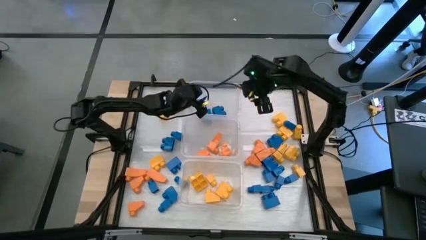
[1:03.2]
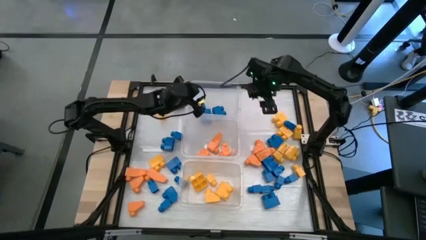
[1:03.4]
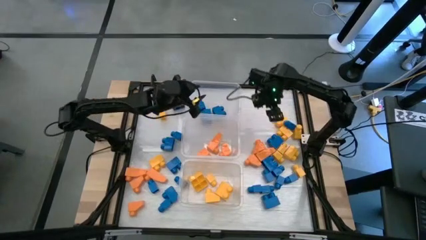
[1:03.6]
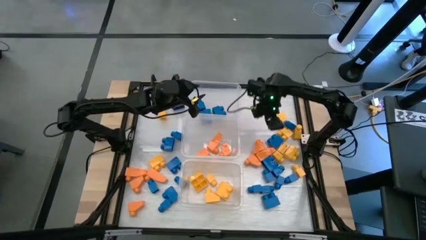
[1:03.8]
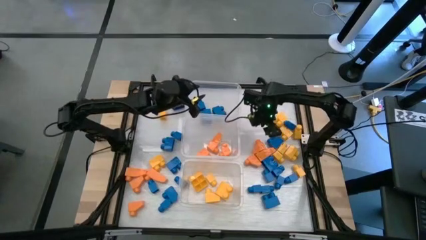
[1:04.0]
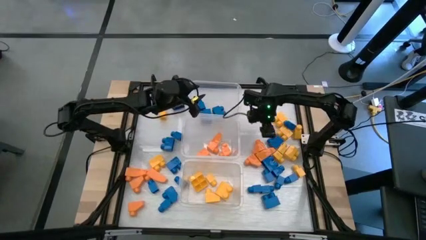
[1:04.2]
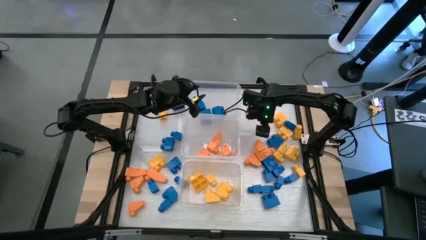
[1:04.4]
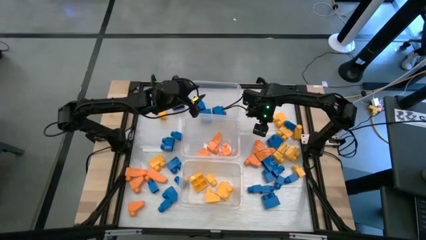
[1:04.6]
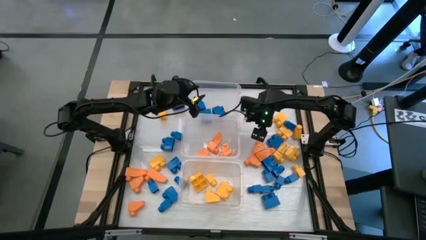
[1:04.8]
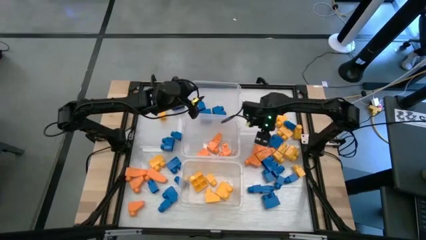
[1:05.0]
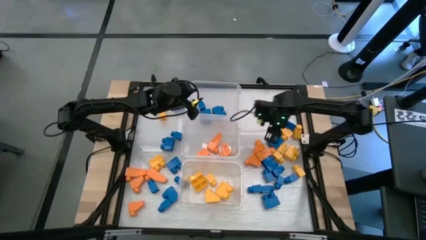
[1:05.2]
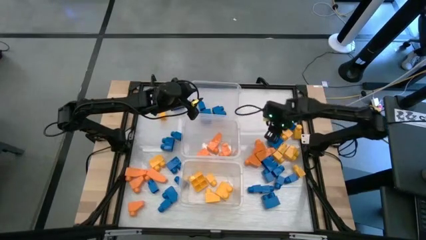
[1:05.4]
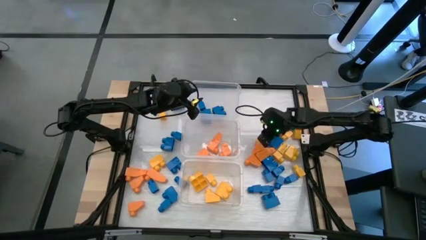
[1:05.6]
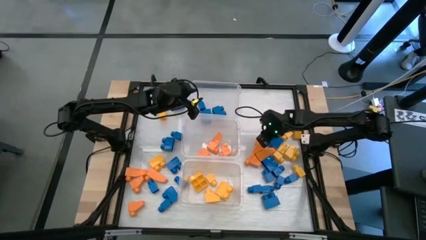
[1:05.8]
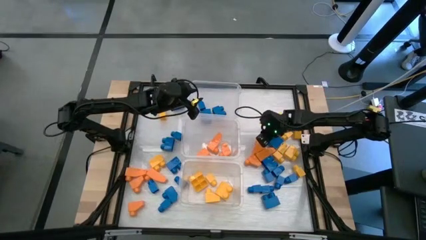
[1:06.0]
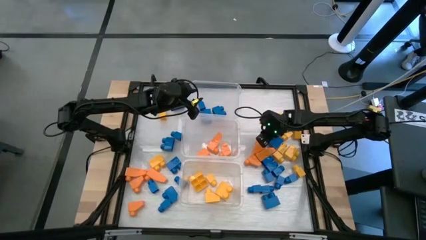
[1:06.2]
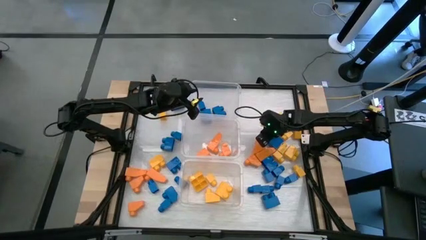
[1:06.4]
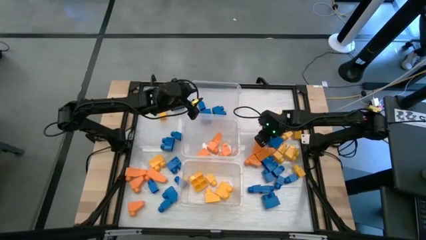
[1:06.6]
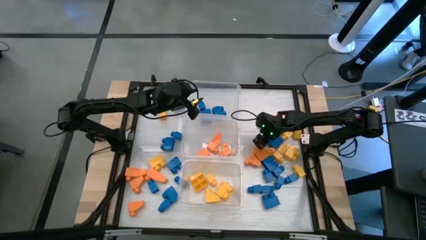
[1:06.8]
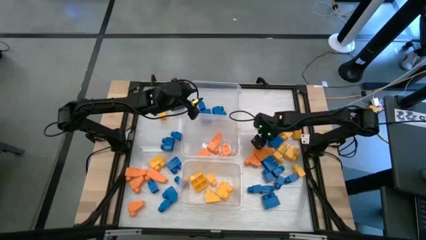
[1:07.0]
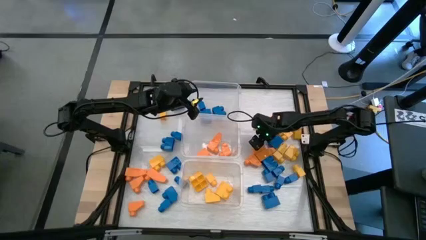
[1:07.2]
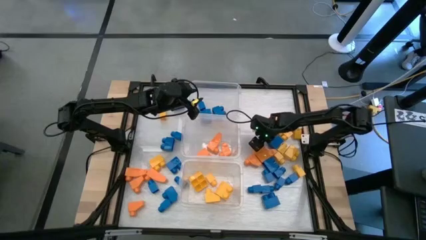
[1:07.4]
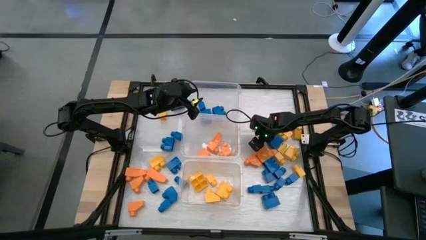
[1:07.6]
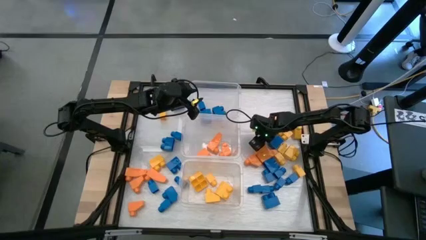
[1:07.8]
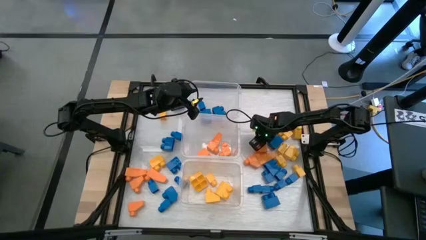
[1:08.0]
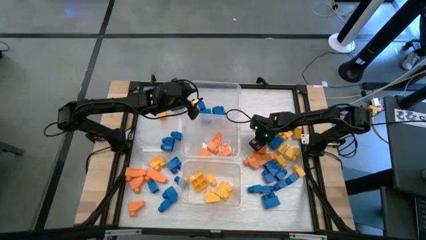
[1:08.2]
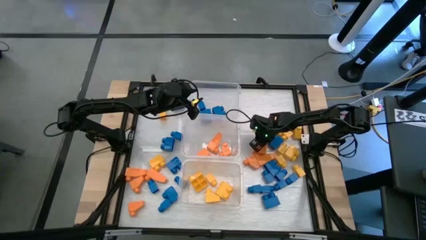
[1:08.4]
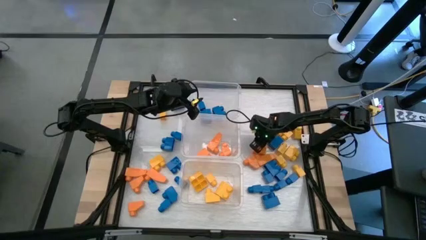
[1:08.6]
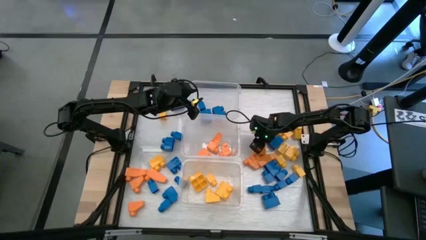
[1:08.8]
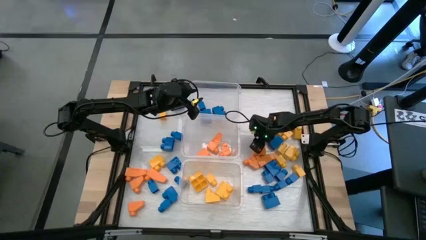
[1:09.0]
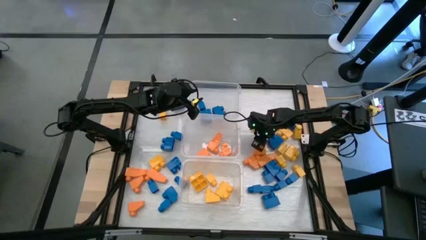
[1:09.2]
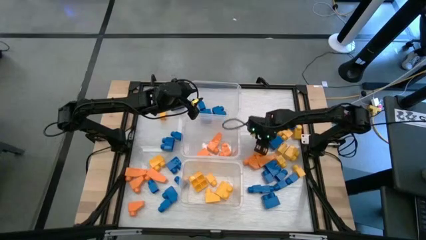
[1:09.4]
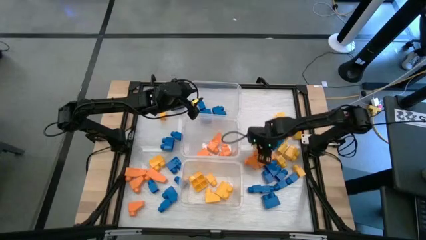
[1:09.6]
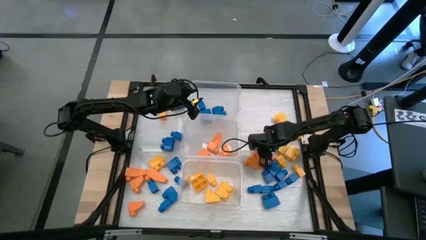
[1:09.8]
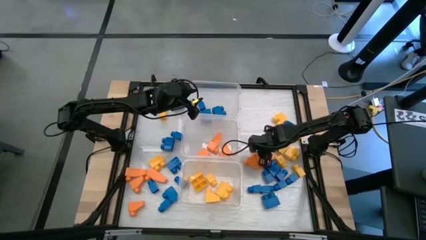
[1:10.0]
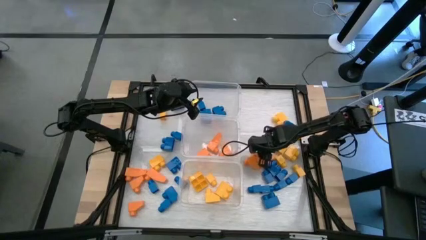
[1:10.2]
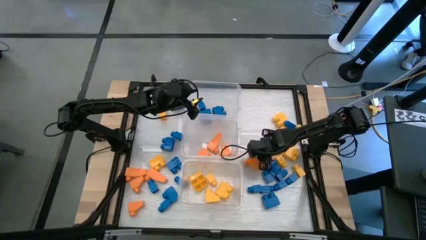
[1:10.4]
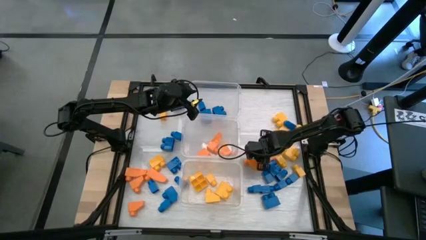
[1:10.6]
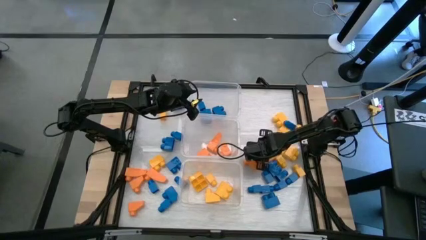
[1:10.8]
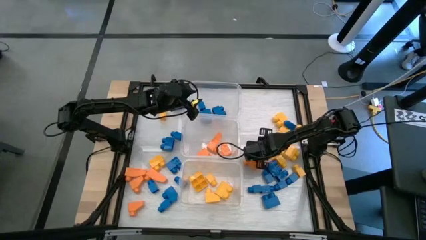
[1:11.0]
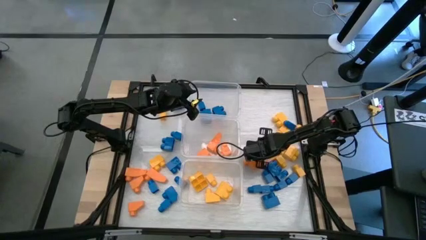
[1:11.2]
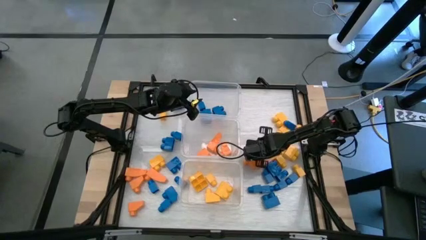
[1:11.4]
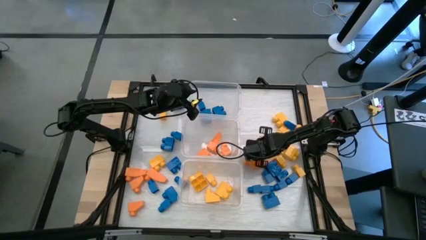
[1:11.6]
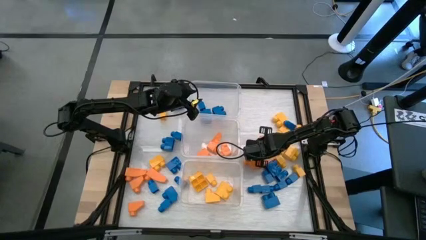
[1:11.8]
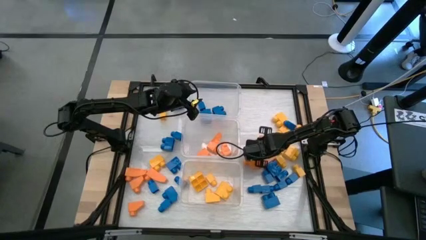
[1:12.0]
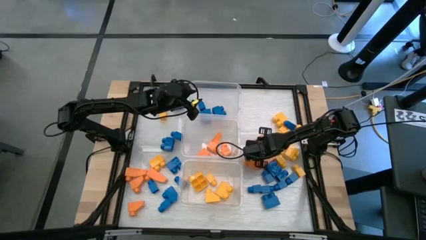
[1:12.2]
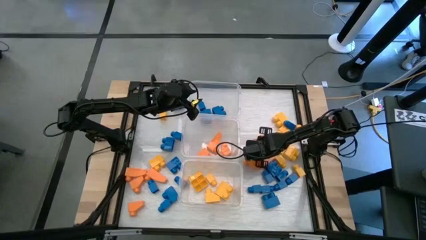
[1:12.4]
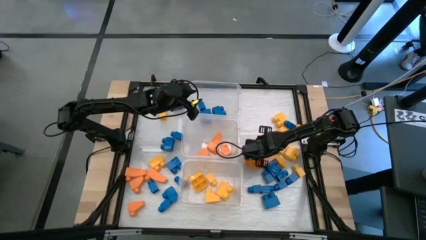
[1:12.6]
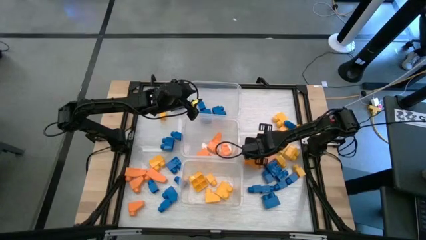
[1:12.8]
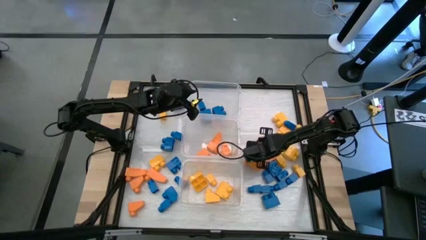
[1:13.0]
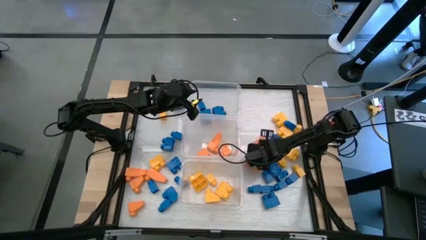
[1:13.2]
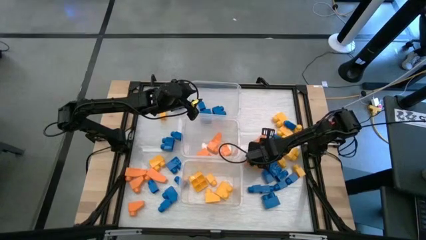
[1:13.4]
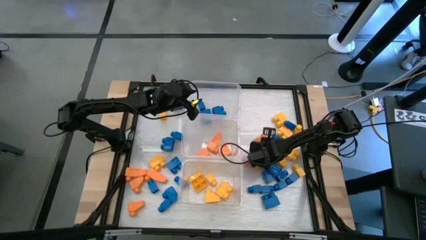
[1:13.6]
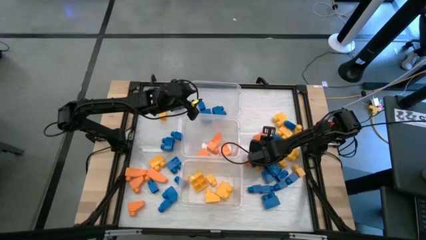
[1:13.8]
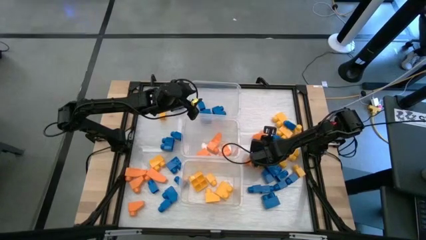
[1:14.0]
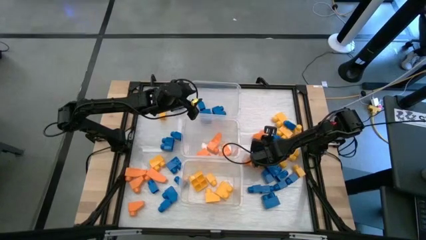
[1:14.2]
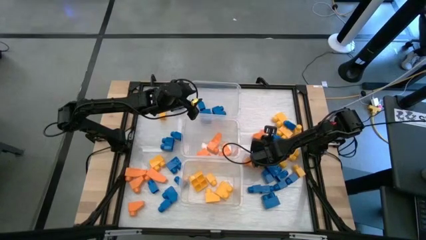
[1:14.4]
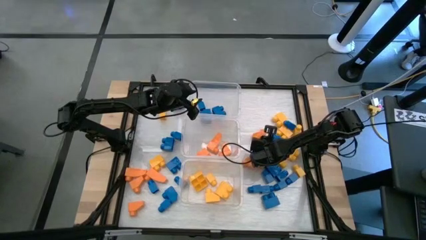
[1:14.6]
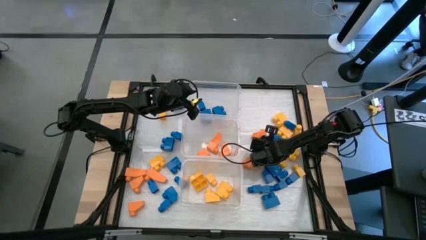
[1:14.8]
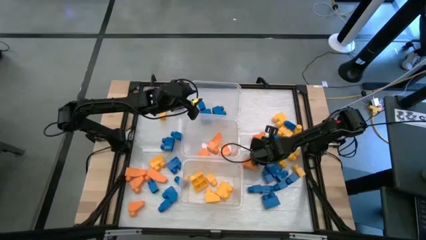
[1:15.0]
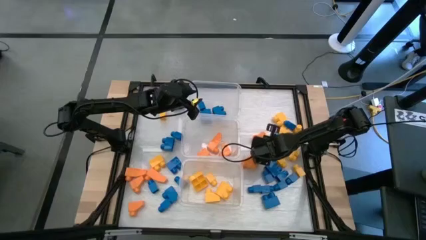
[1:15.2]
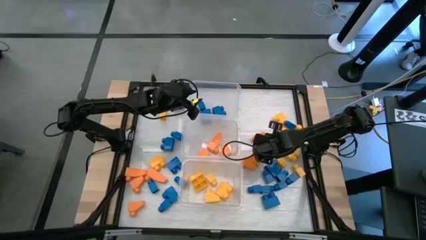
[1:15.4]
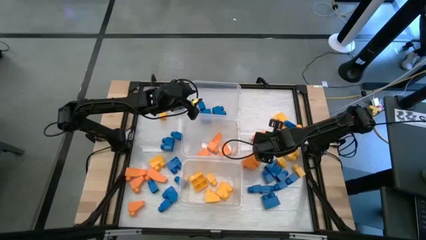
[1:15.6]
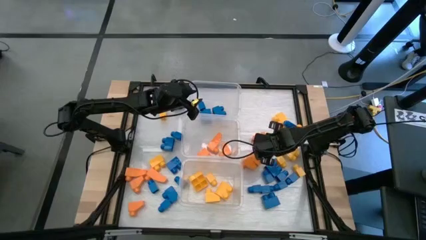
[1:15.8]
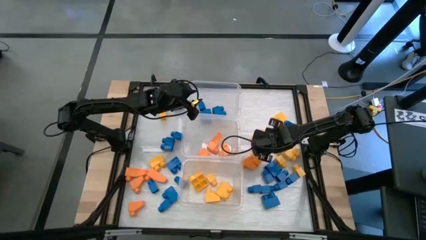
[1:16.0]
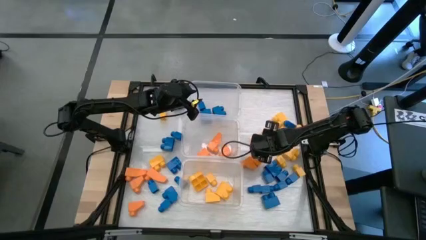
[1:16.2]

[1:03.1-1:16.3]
Task: Sort blocks
Put the orange game piece into the middle transparent bin

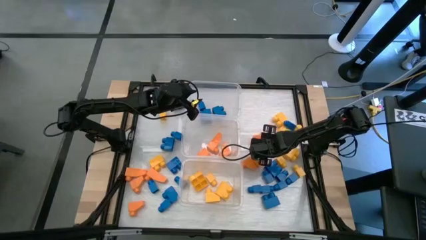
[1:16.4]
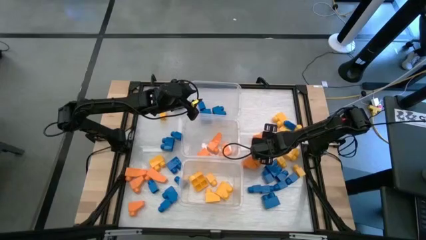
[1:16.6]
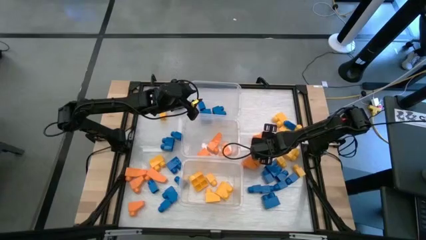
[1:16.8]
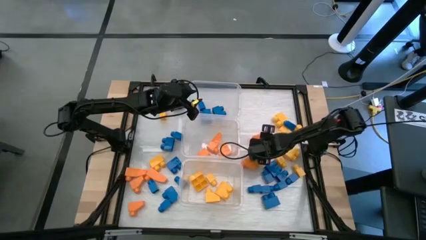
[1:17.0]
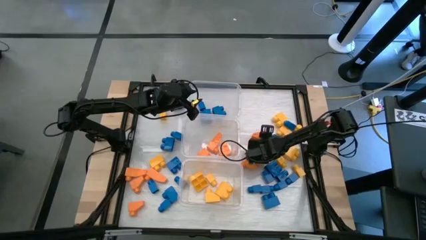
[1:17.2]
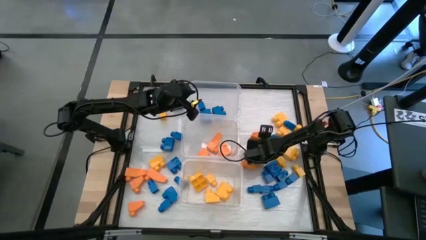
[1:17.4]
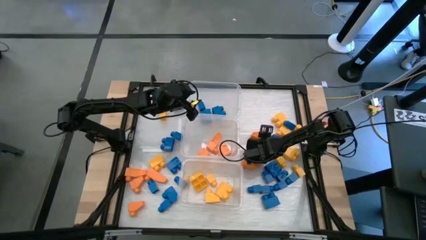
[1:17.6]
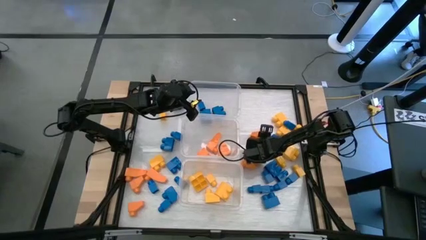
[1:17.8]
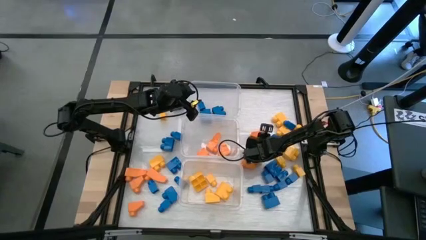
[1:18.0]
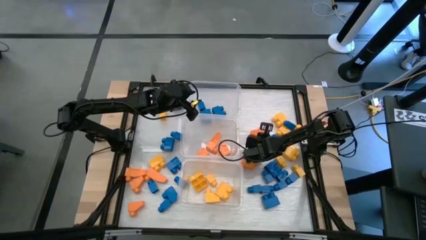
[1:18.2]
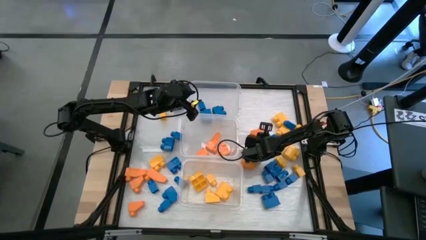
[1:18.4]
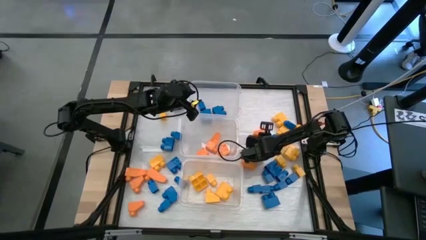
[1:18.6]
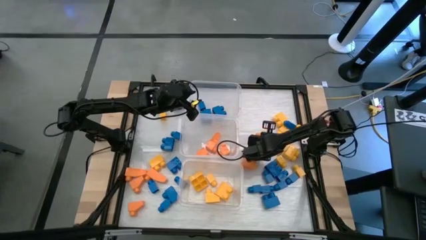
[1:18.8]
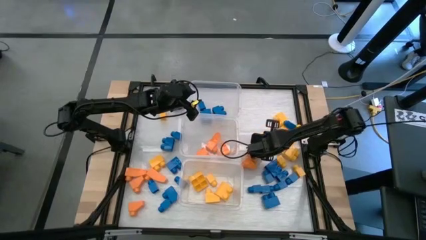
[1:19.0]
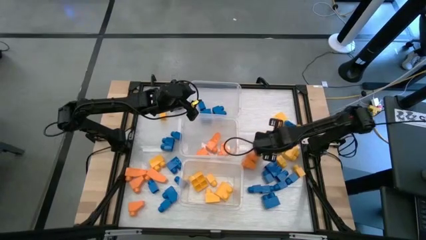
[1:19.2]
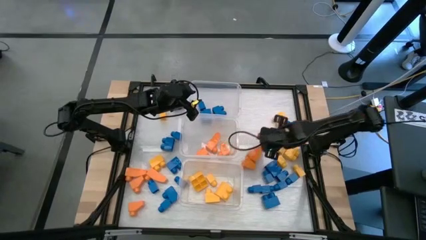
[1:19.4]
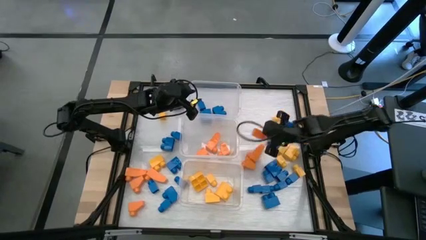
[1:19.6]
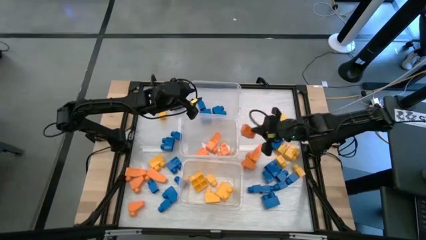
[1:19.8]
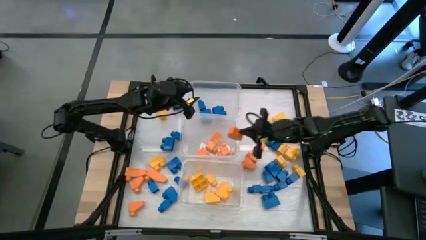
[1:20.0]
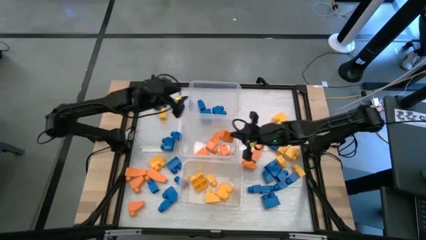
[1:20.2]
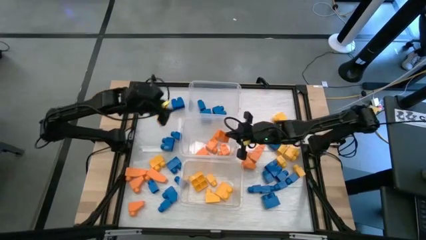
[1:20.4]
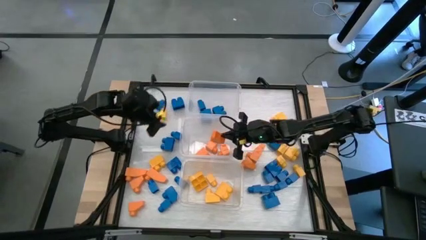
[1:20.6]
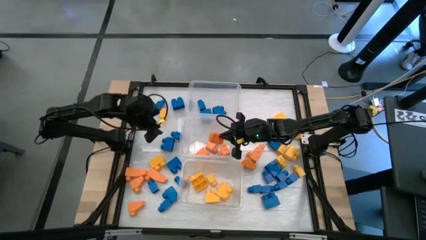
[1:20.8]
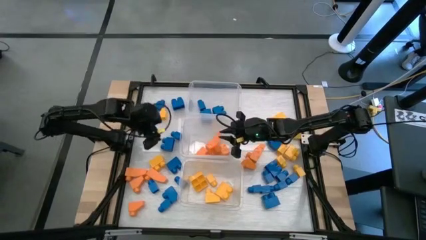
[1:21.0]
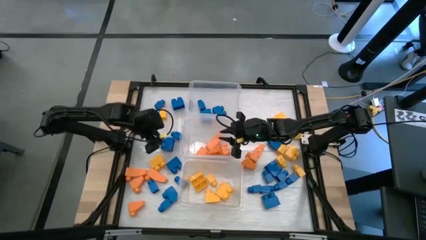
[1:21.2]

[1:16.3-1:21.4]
Put the orange game piece into the middle transparent bin
